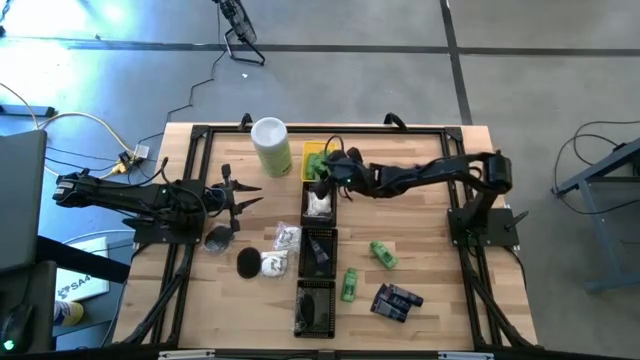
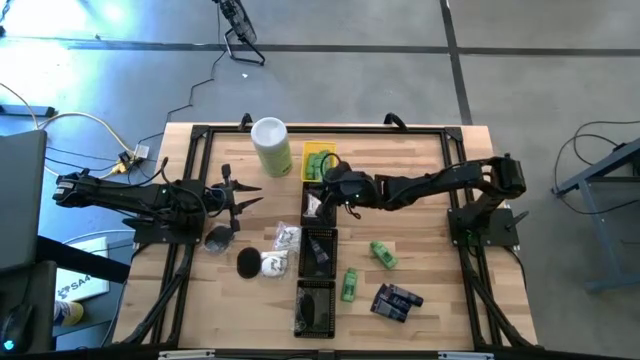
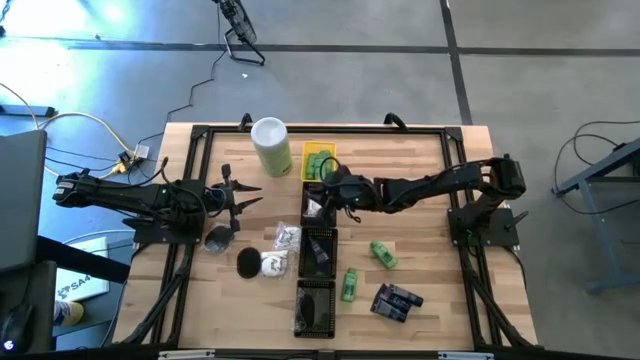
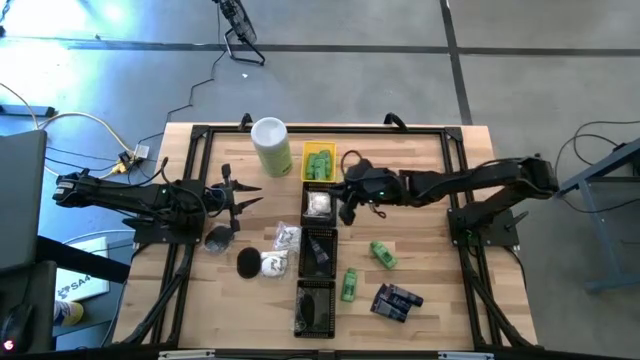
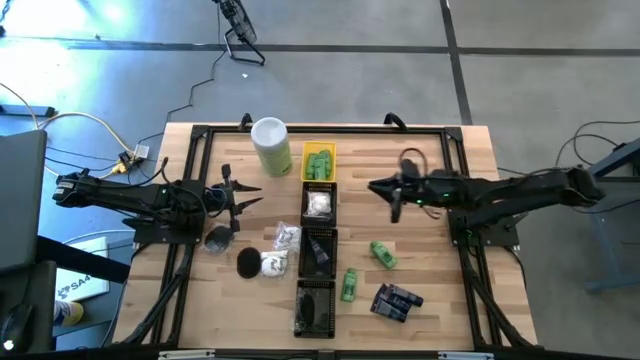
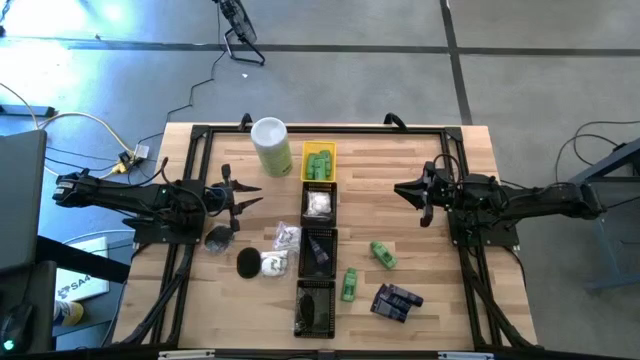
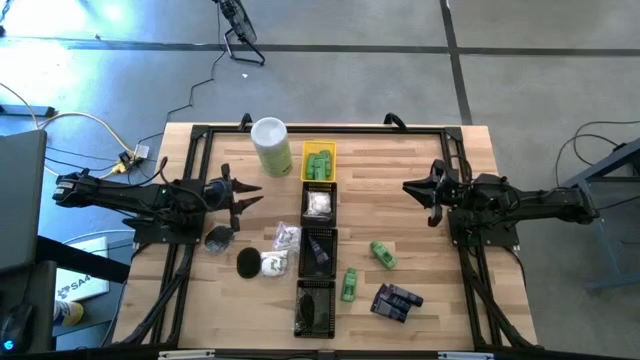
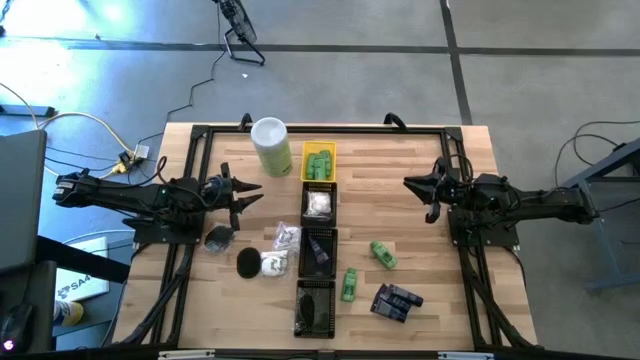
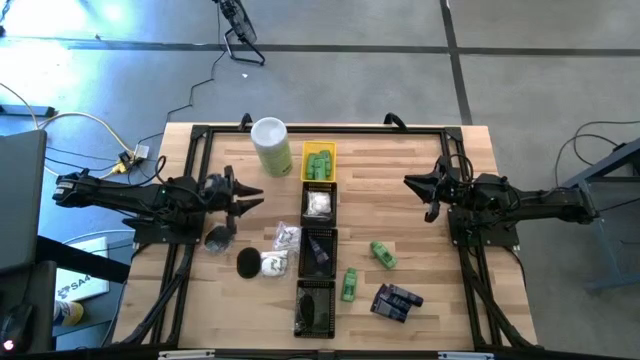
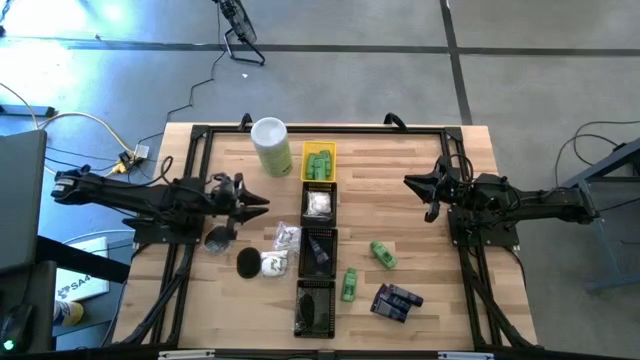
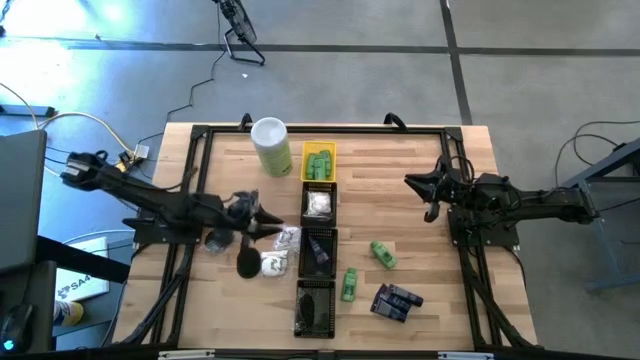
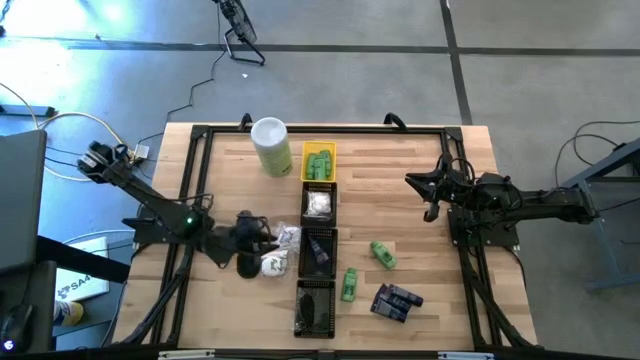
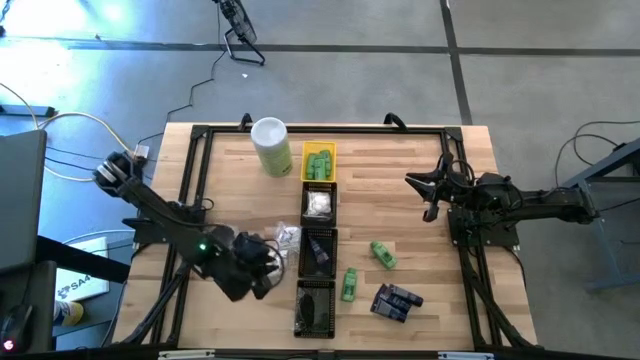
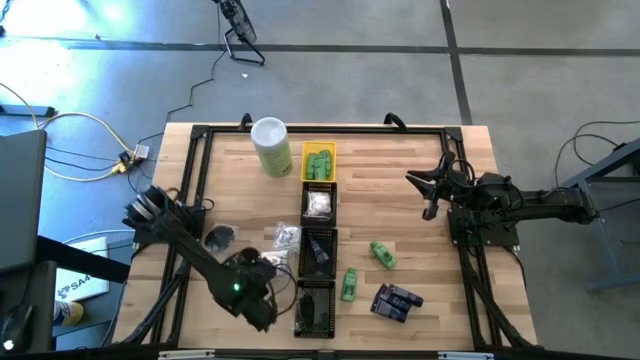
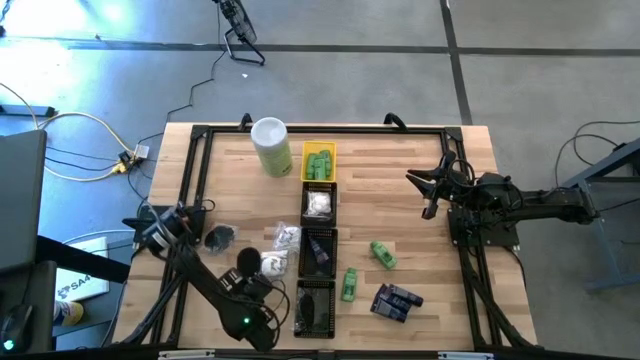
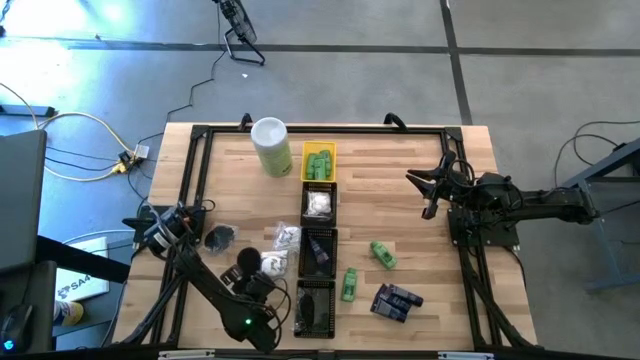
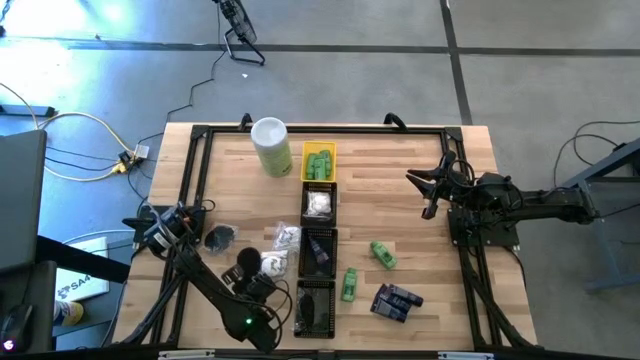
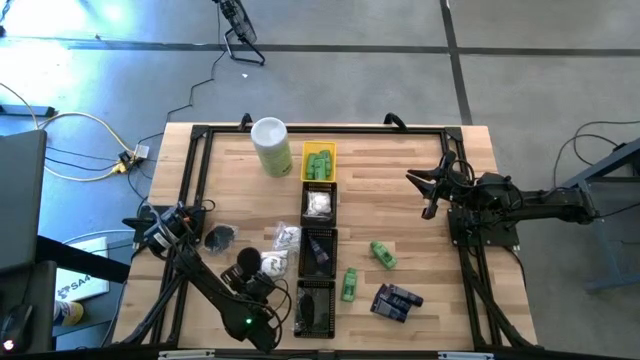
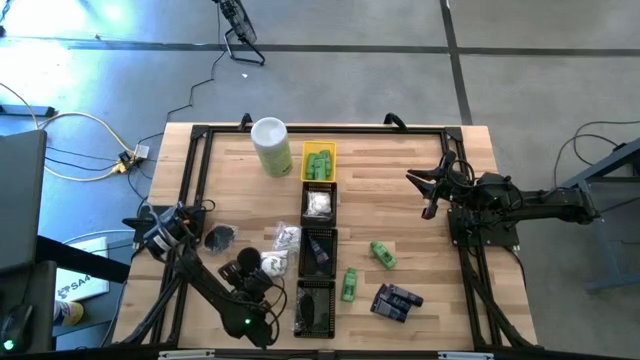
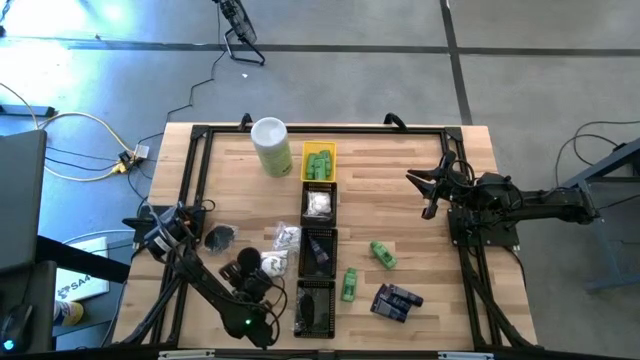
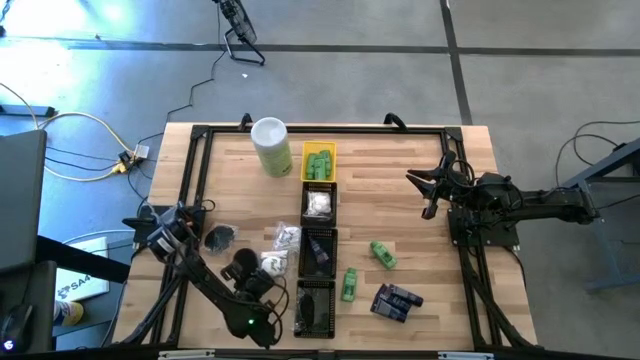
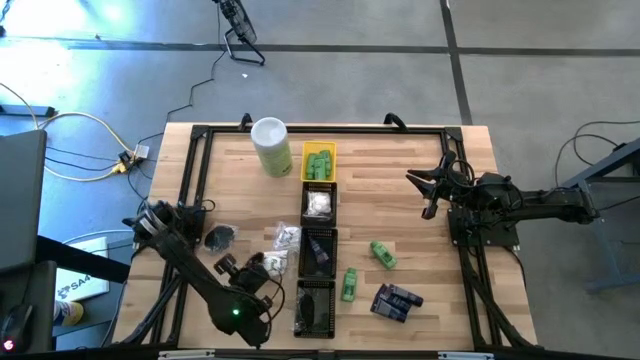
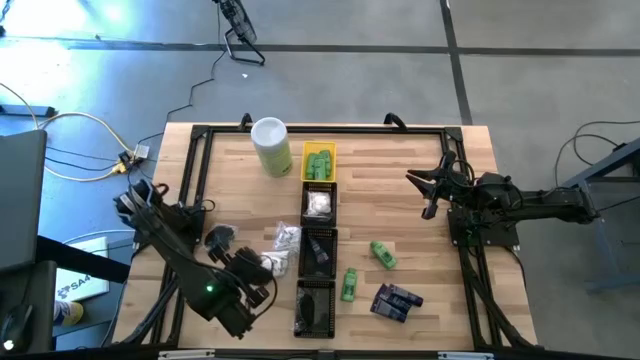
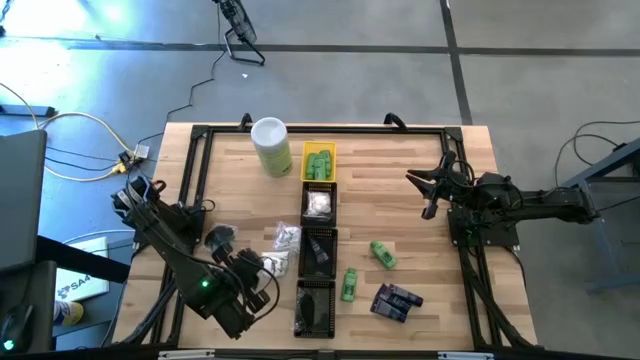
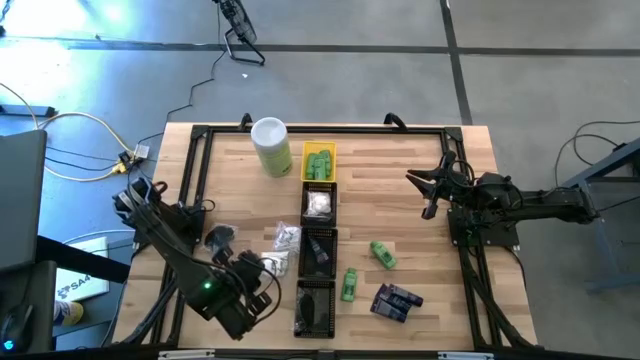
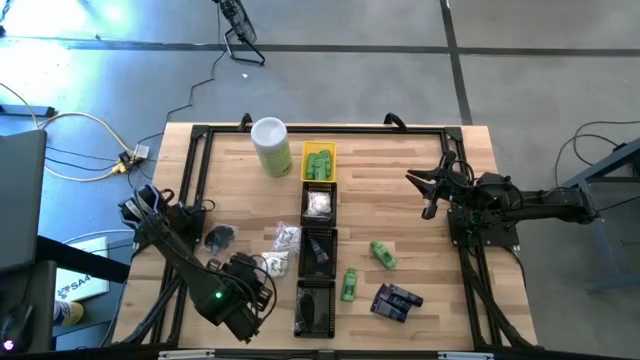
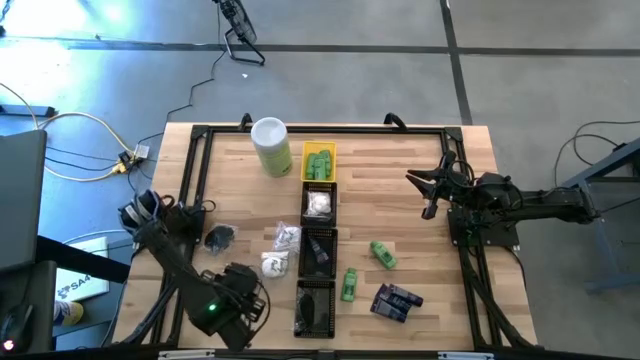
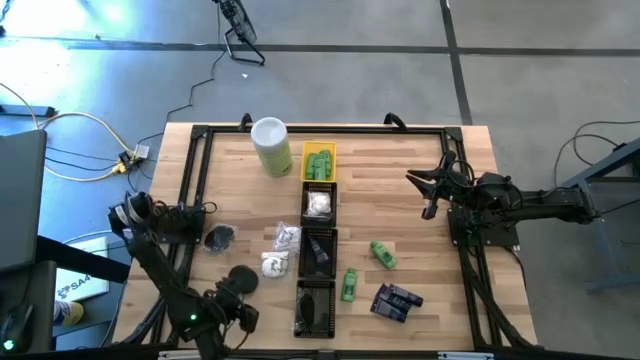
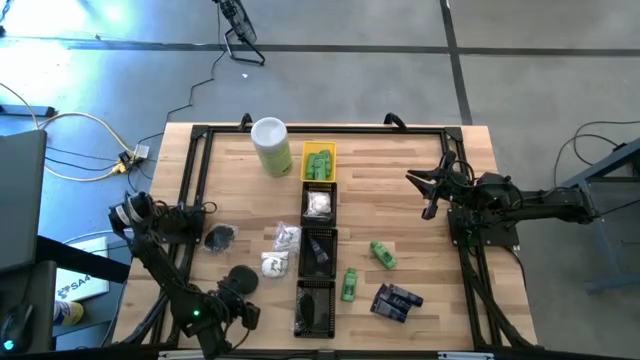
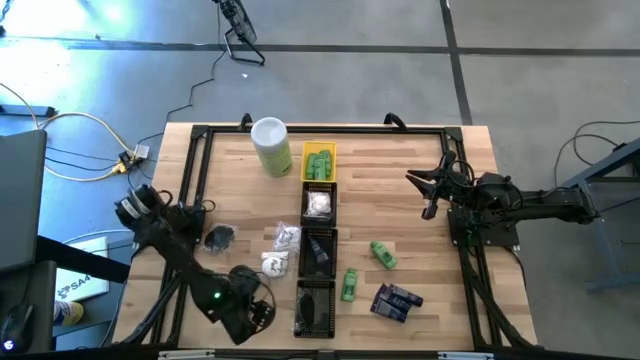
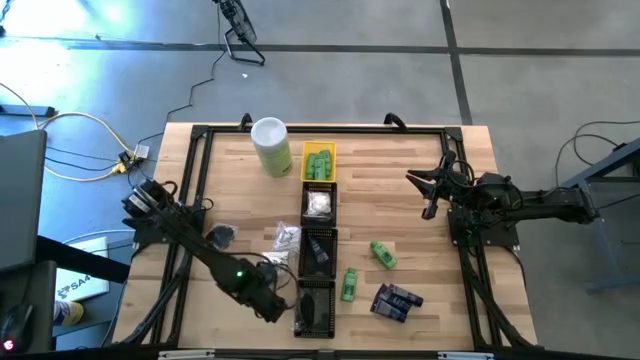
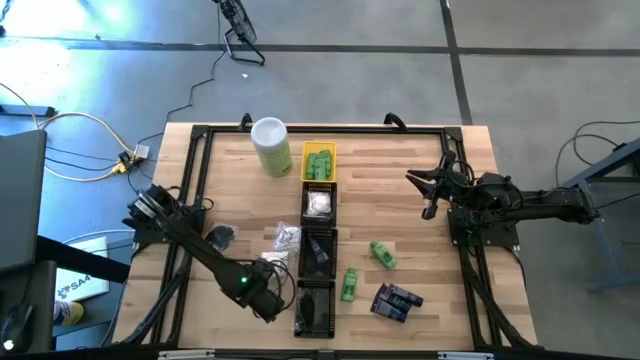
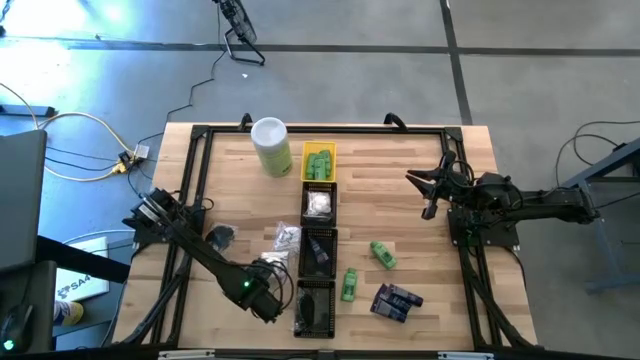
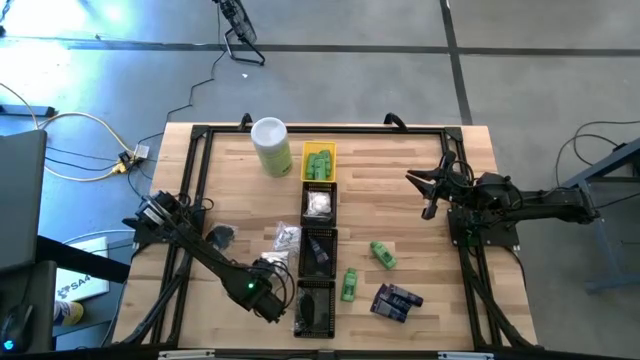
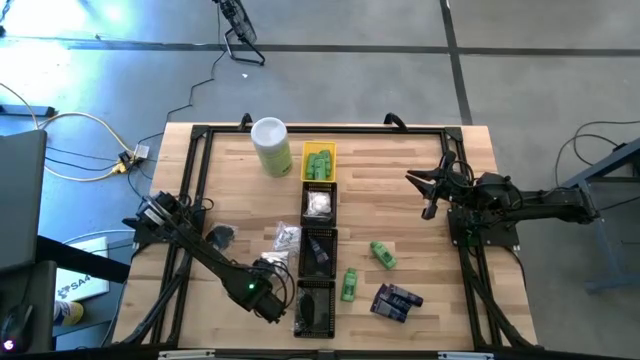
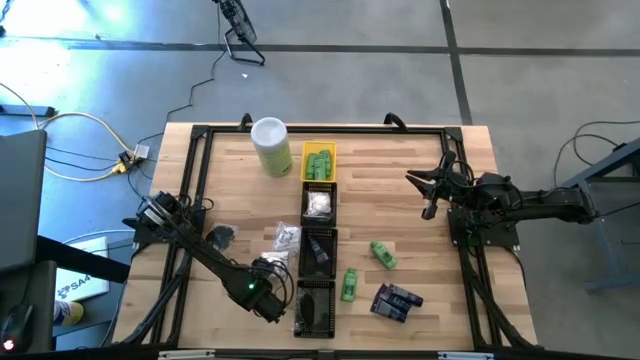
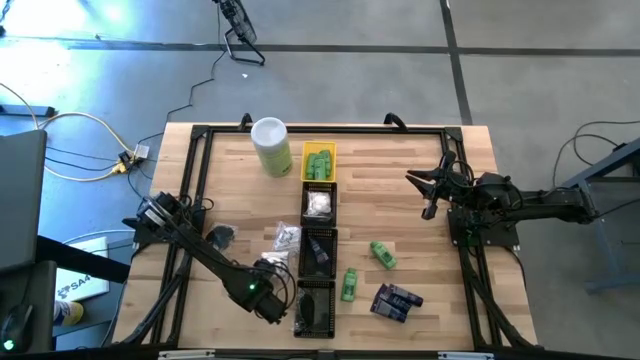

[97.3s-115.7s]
Task: Pick & Place Travel size toiletries
Put the right black hairbrush into the bottom black basket

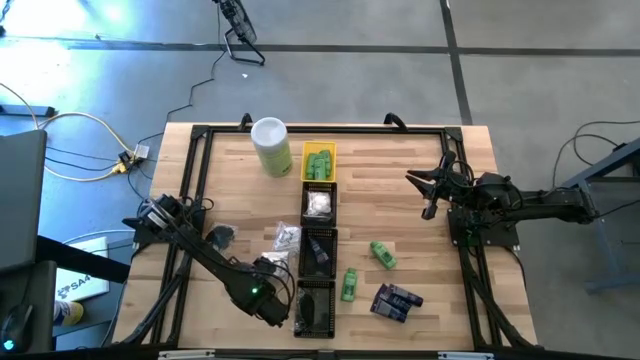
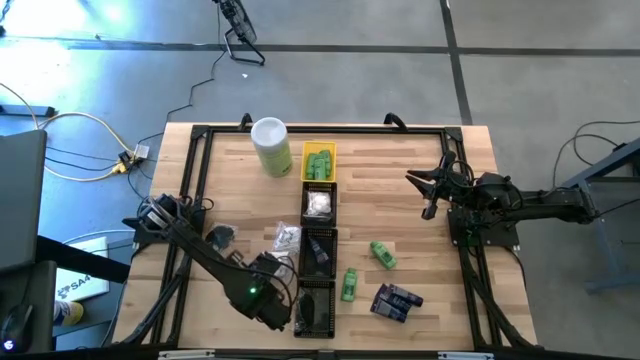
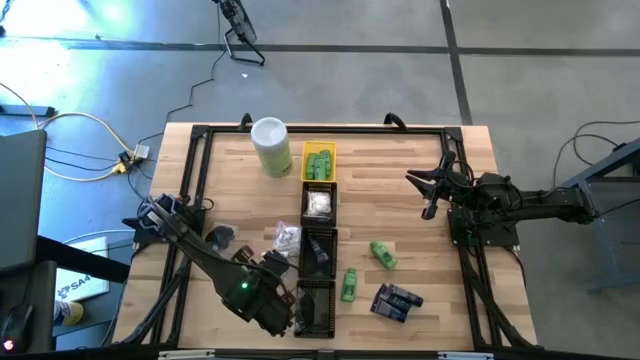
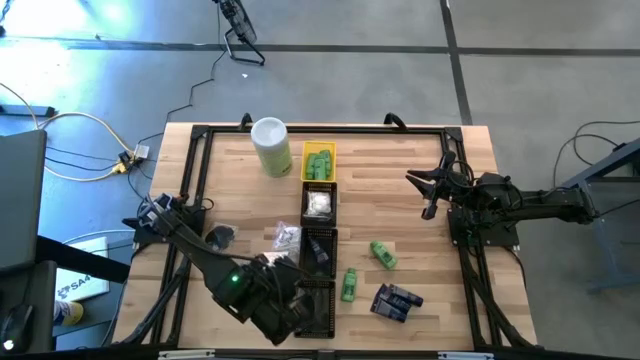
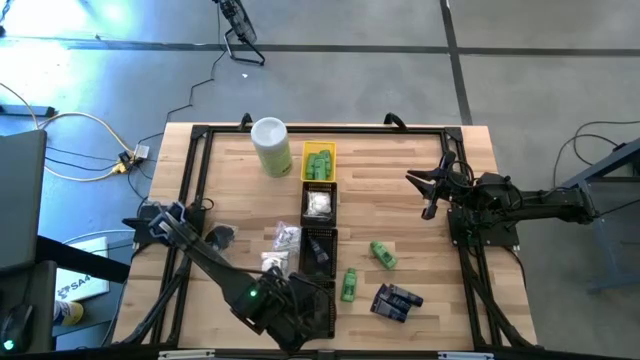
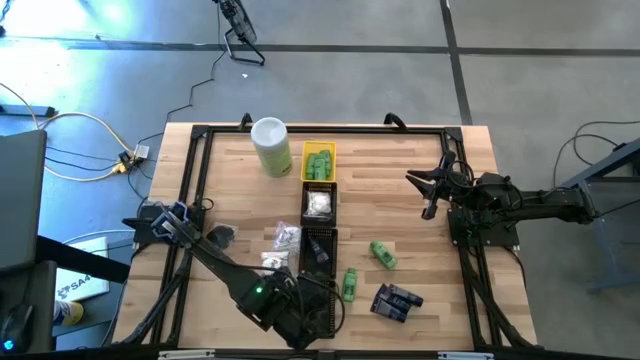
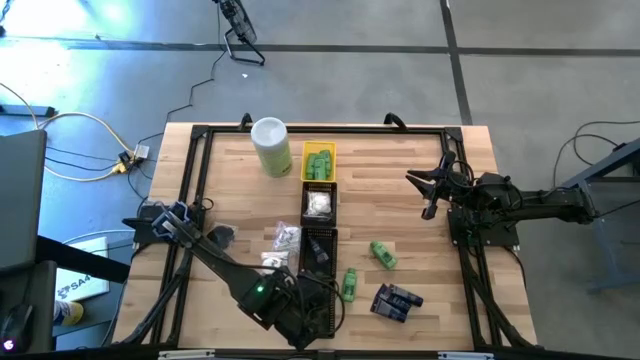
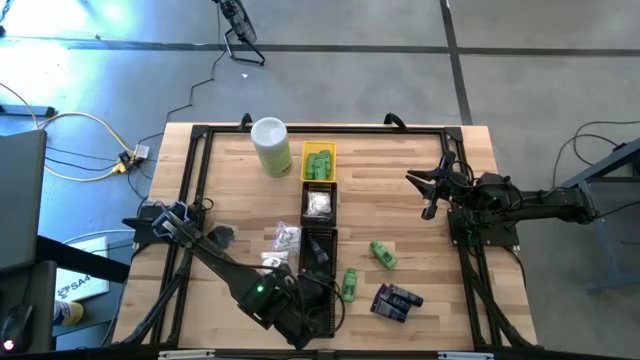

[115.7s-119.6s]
Put the right black hairbrush into the bottom black basket
